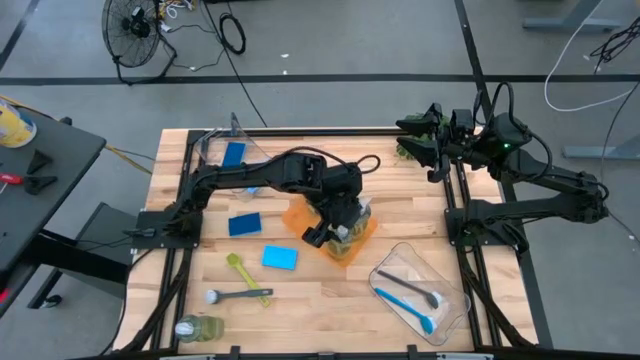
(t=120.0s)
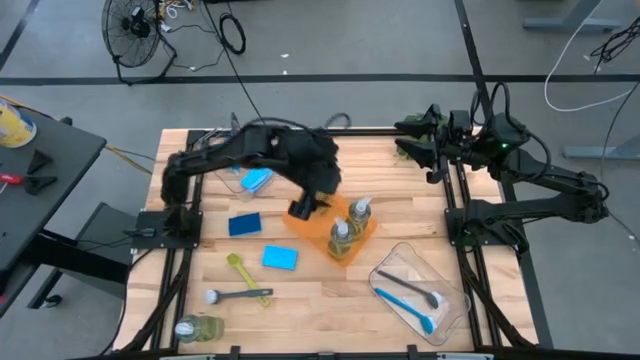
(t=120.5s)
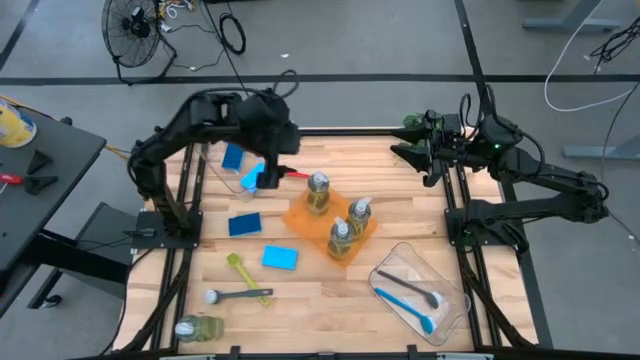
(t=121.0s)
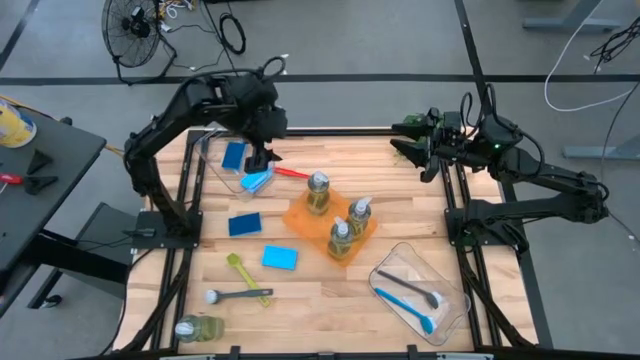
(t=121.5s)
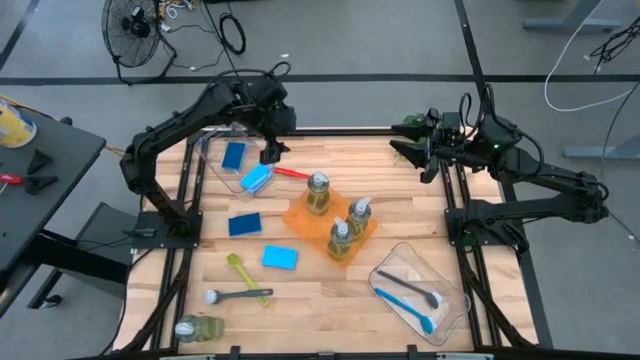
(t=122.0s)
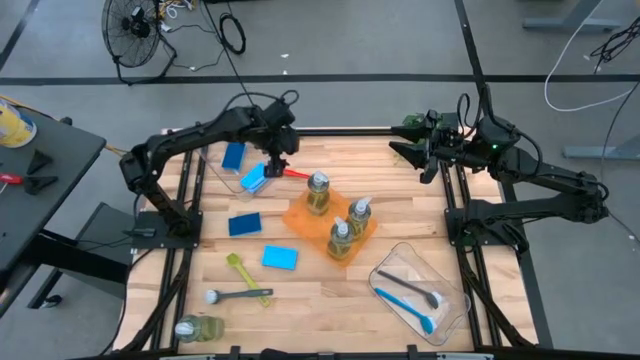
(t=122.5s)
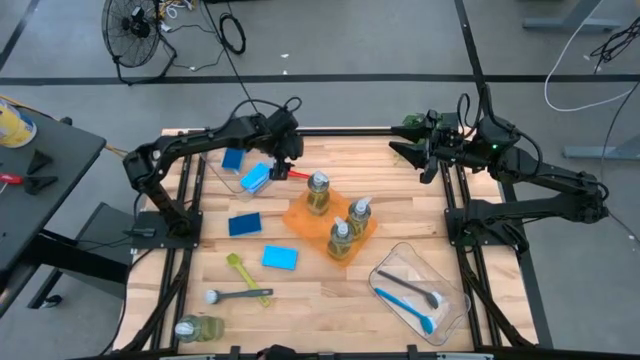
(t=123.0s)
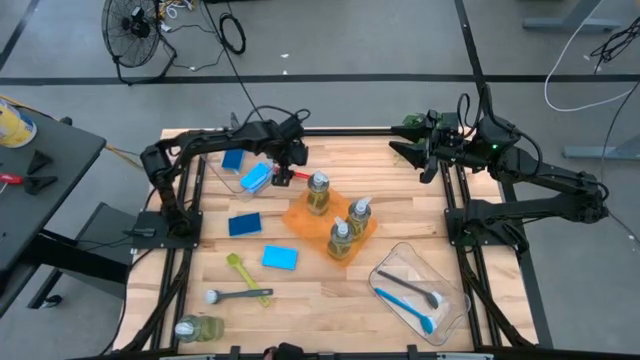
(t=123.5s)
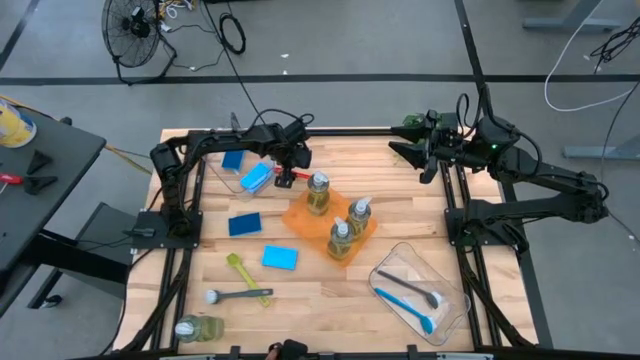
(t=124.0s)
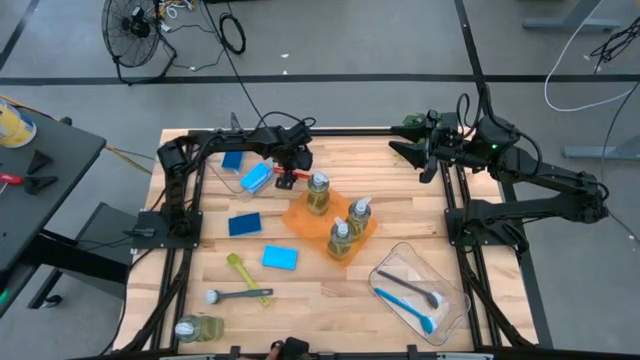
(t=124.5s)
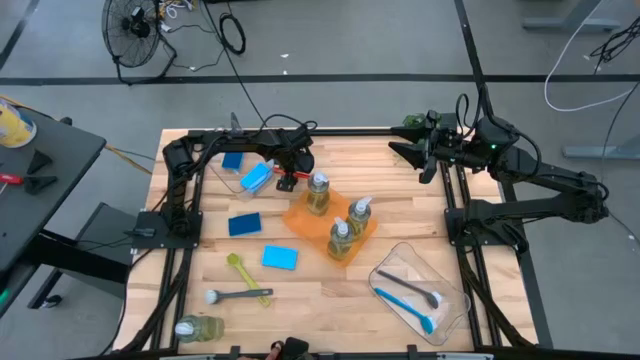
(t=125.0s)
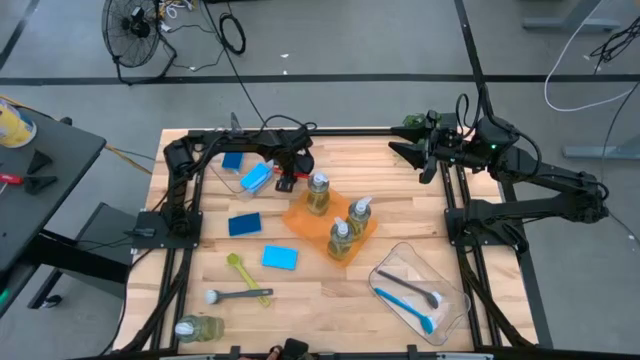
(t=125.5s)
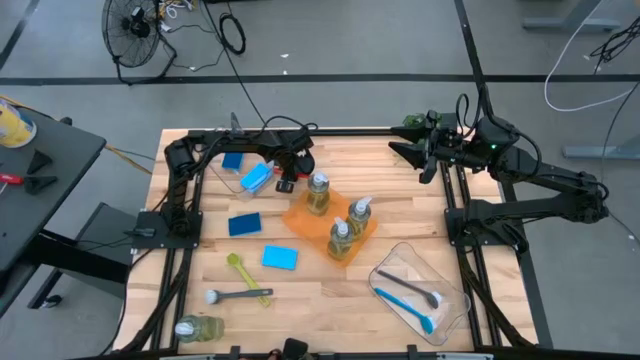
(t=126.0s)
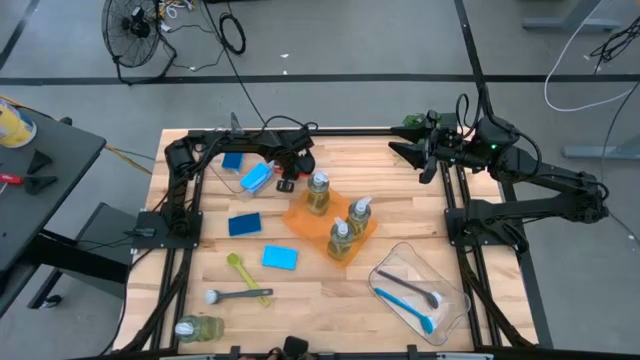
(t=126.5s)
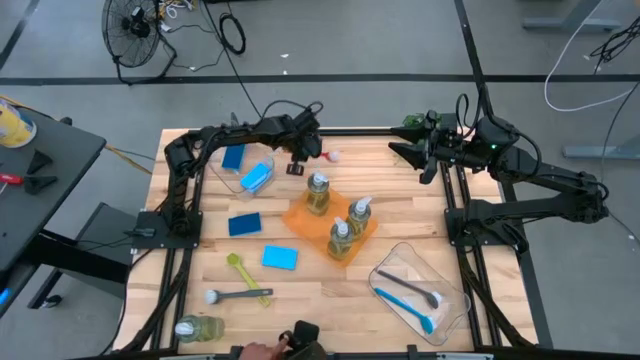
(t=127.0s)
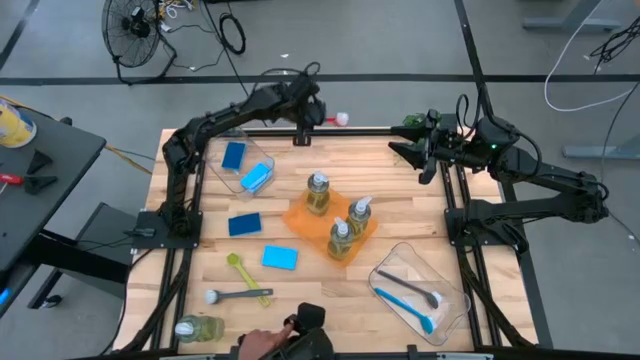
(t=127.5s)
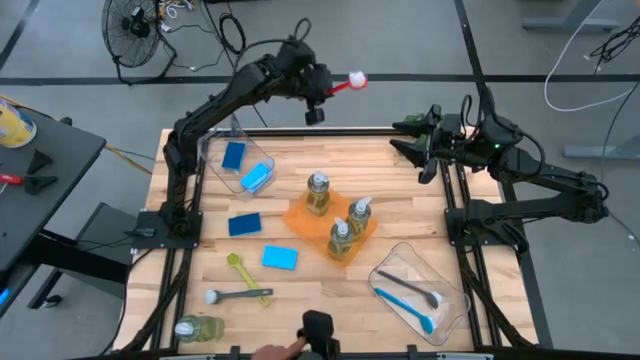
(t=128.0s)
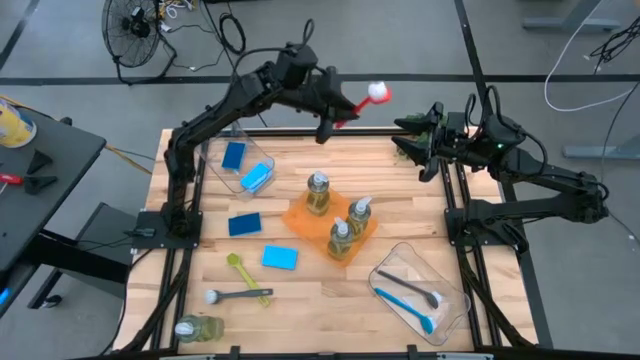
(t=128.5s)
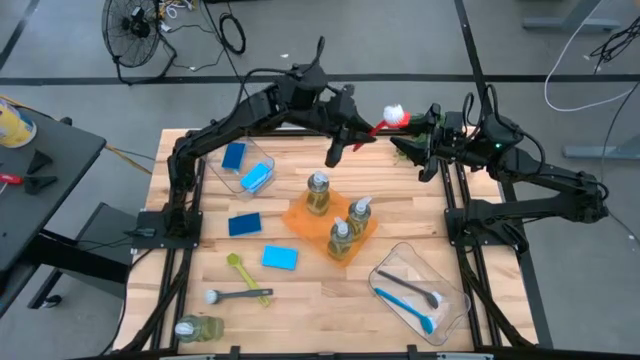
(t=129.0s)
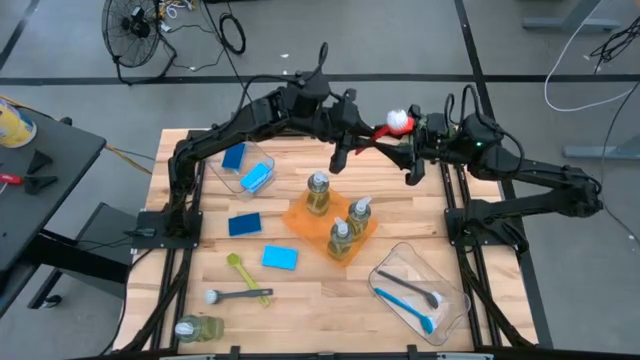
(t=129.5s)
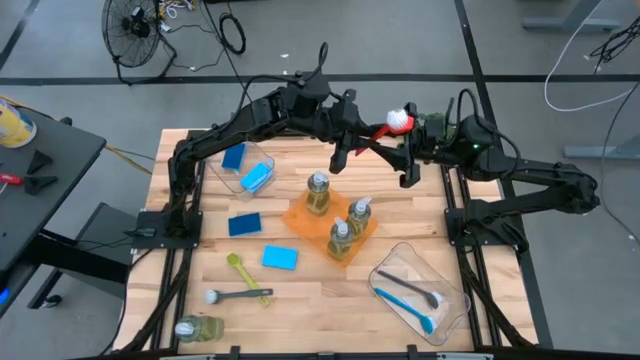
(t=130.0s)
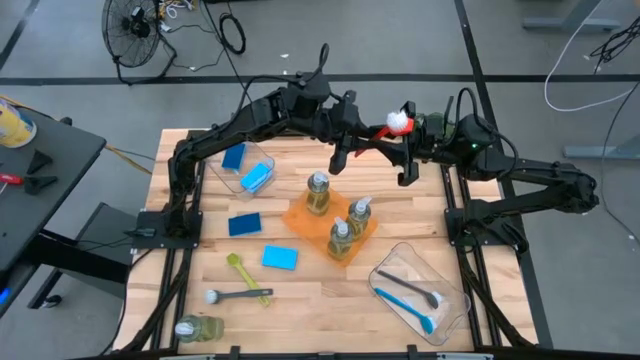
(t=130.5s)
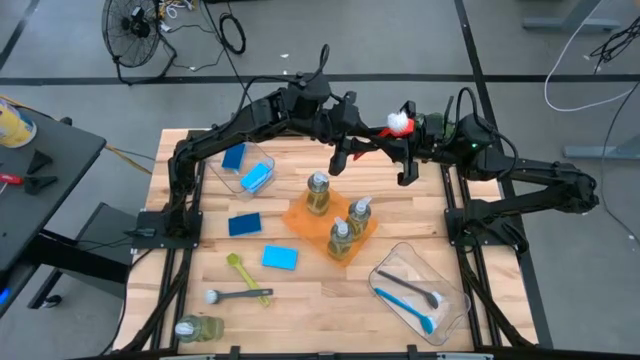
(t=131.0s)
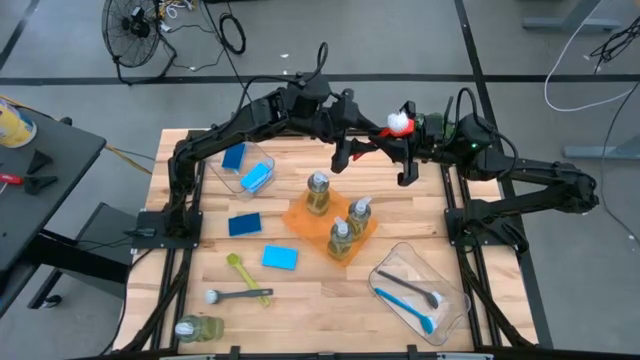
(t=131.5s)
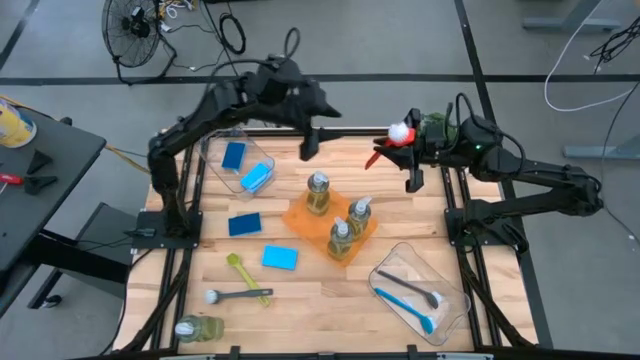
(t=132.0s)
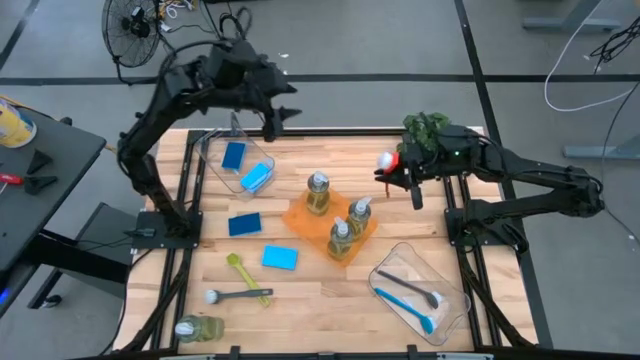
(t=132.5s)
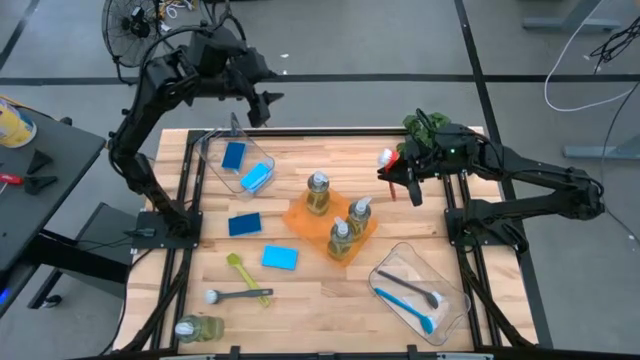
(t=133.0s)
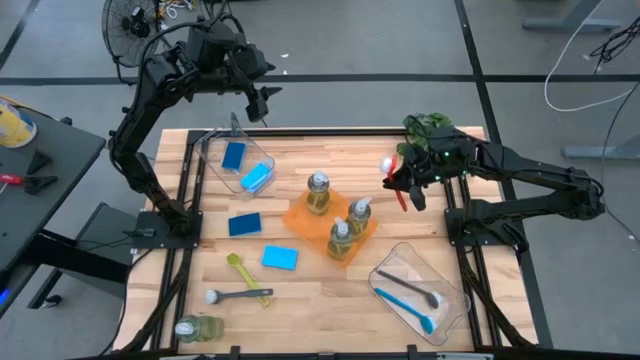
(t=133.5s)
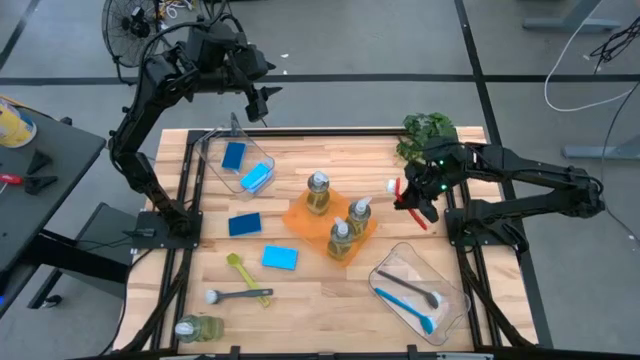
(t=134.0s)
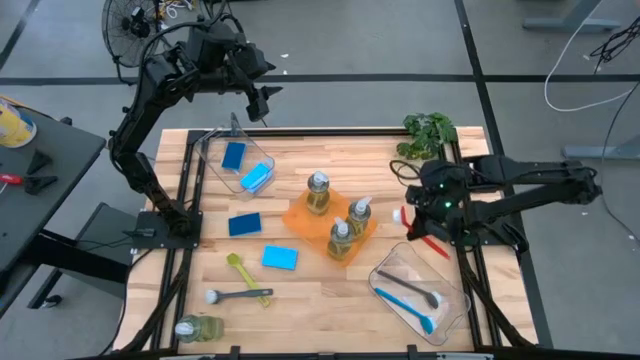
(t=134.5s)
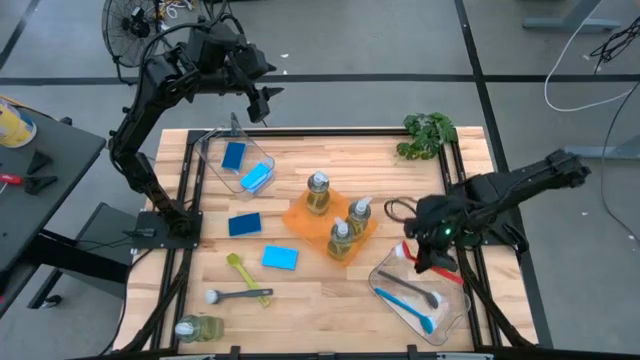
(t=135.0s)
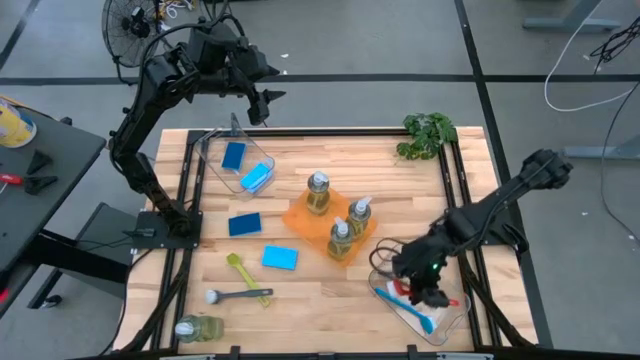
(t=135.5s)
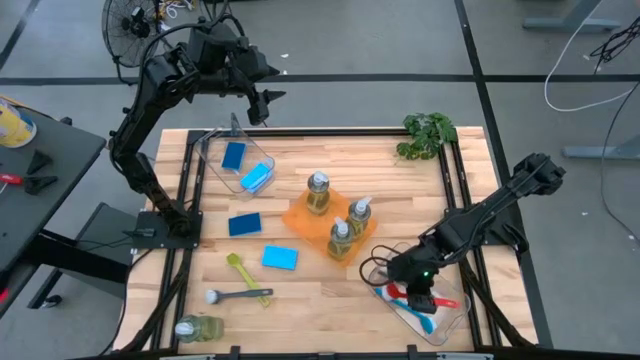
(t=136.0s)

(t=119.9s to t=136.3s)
Task: Pick & Place Kitchen Sink Supplies
Put the orange dish brush into the bottom transparent bin

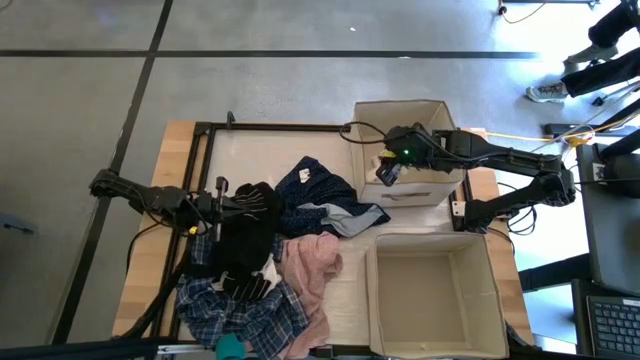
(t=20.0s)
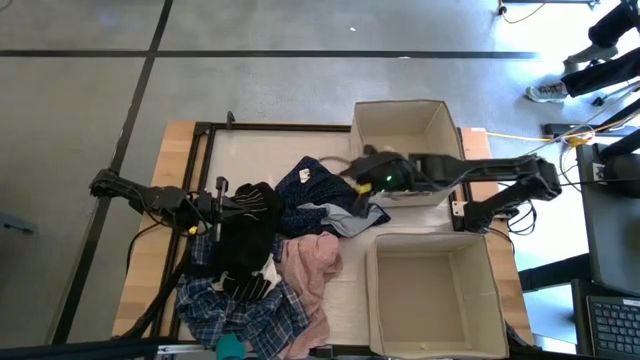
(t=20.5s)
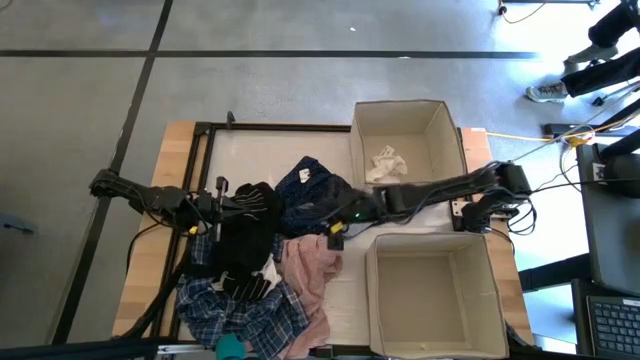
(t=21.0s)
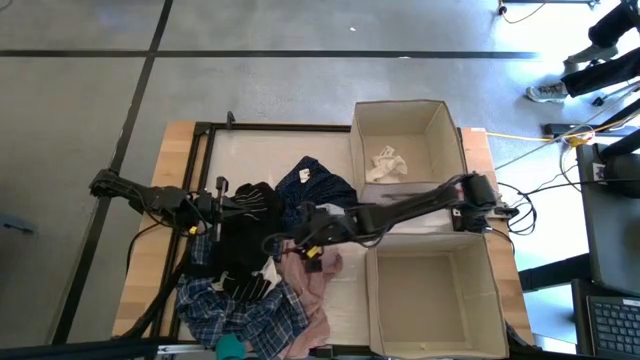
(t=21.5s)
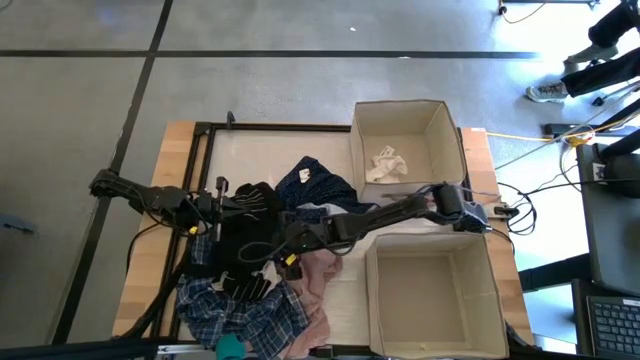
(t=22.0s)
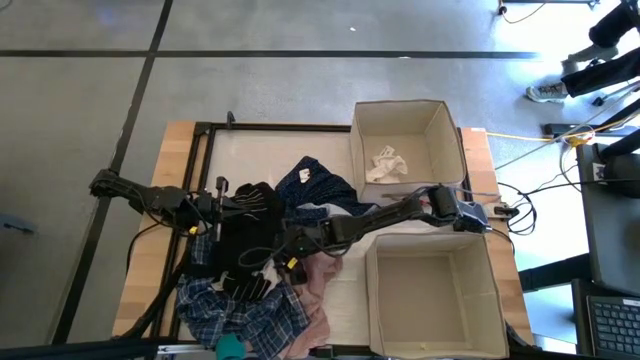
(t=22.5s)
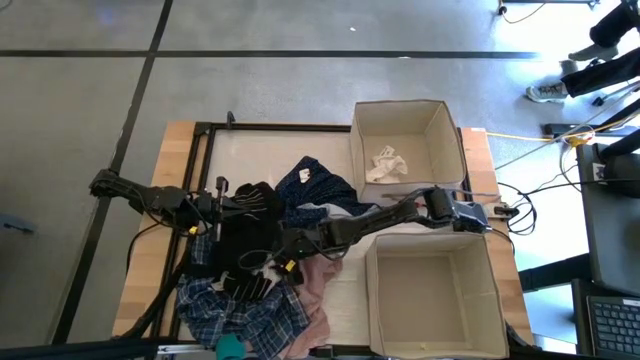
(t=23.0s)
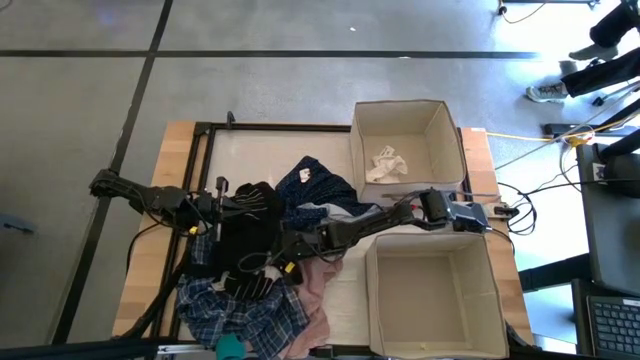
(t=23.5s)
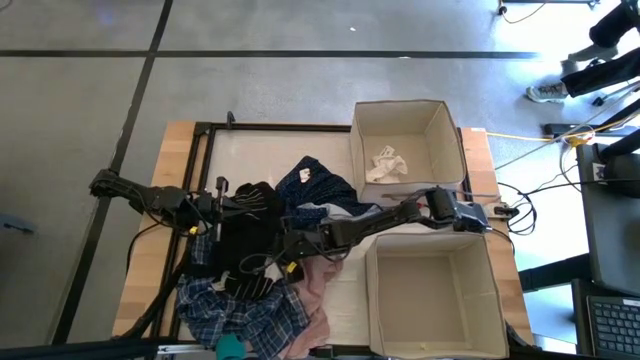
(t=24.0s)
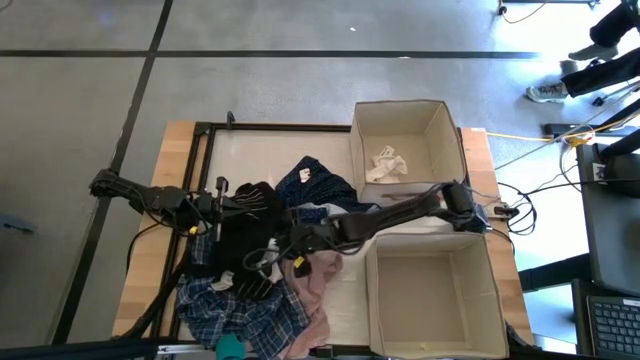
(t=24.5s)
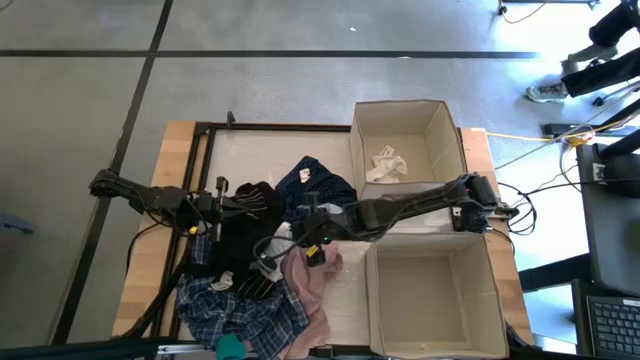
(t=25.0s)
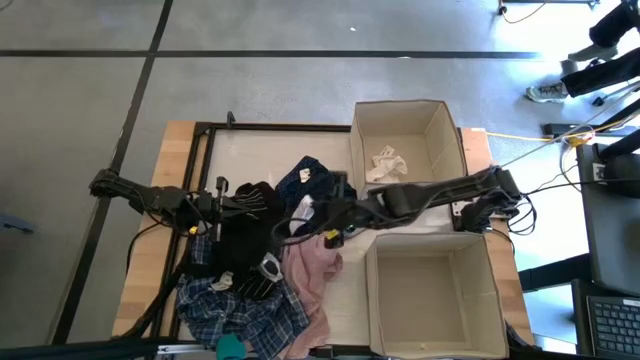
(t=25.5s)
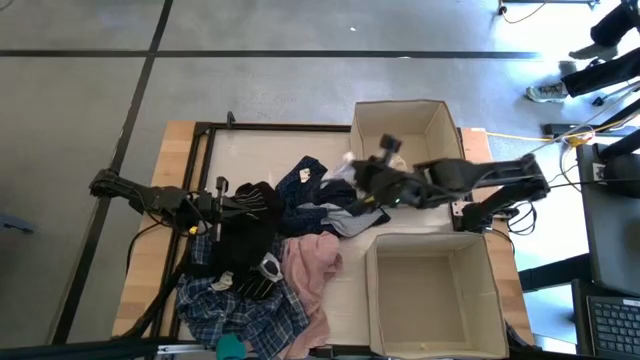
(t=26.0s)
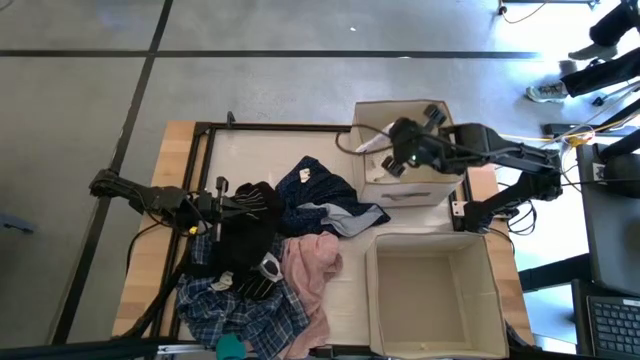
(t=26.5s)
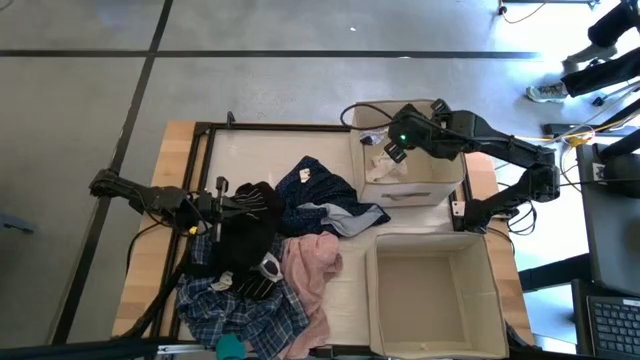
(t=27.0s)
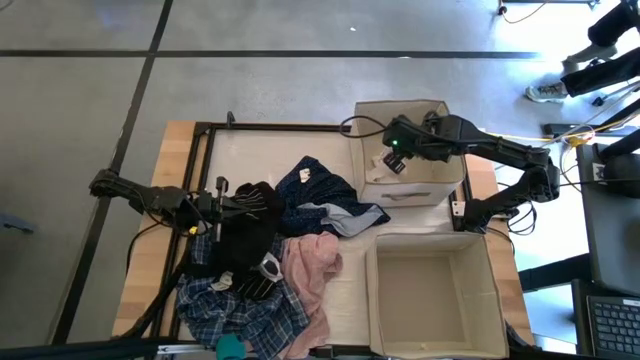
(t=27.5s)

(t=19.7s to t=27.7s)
Task: Sort clothes
Put the white sock into the top laundry organizer
